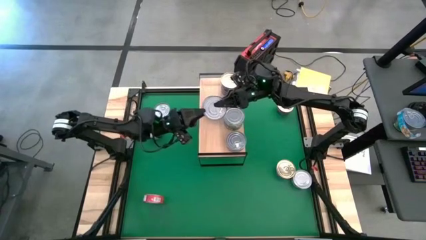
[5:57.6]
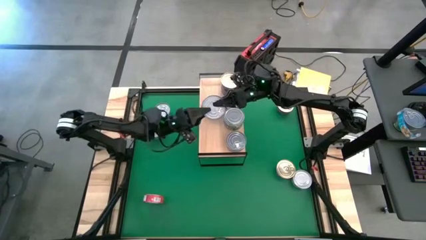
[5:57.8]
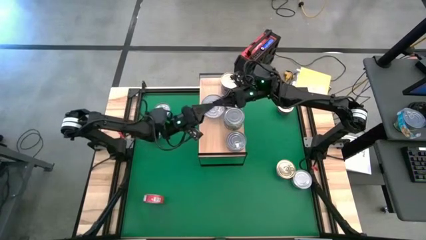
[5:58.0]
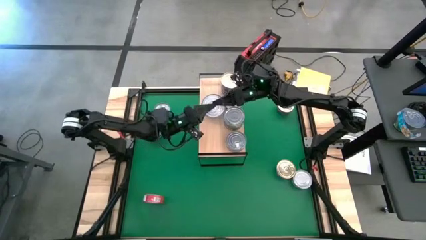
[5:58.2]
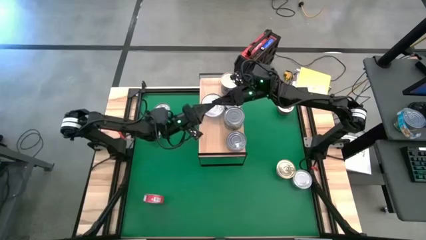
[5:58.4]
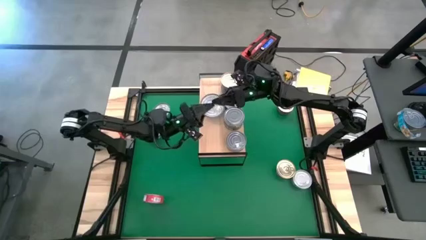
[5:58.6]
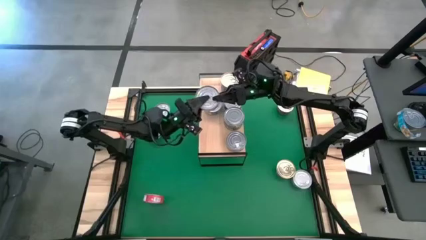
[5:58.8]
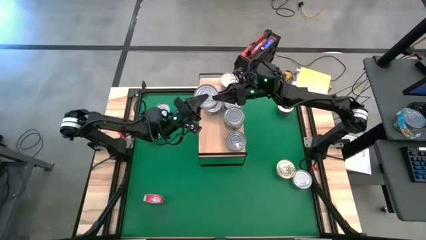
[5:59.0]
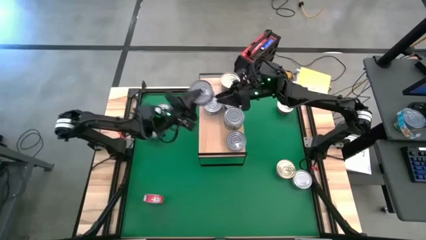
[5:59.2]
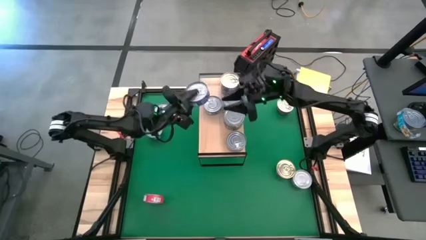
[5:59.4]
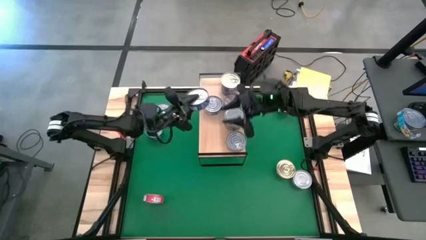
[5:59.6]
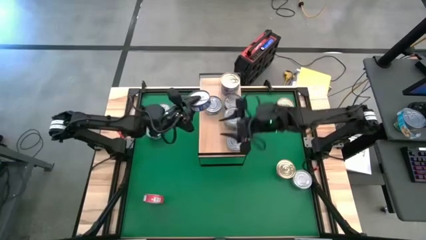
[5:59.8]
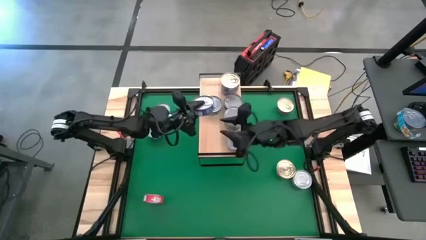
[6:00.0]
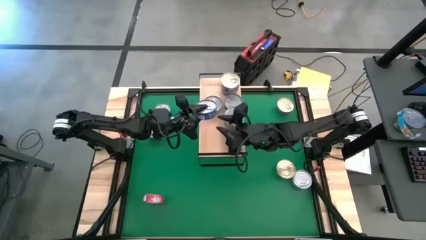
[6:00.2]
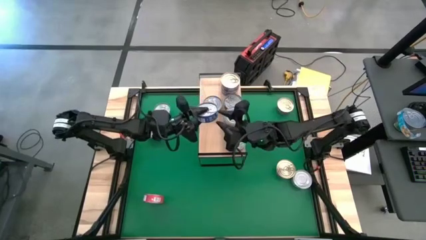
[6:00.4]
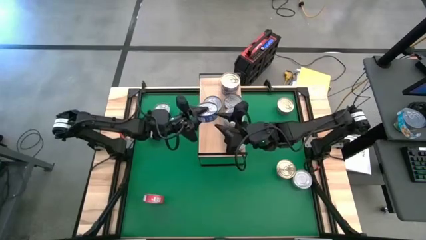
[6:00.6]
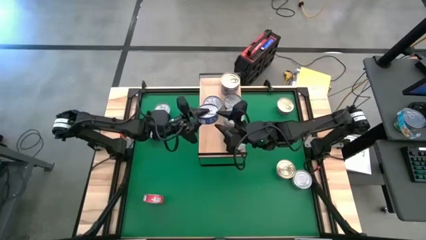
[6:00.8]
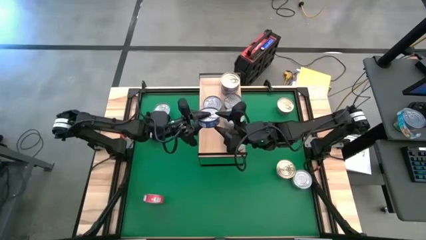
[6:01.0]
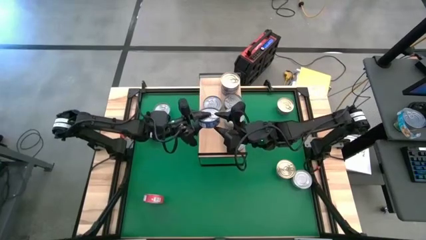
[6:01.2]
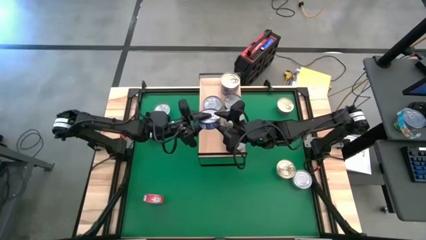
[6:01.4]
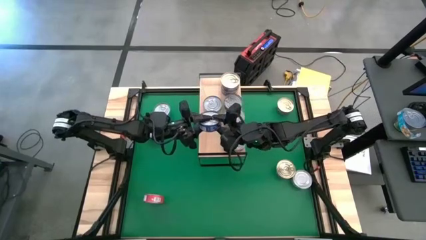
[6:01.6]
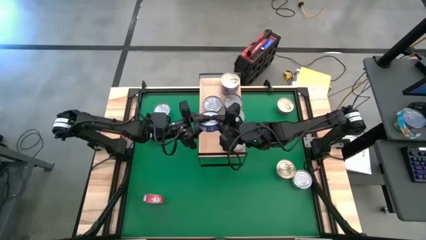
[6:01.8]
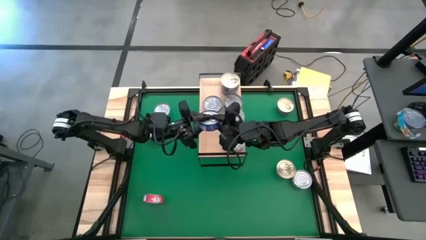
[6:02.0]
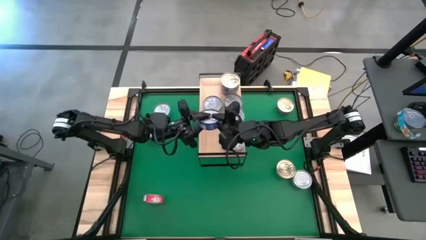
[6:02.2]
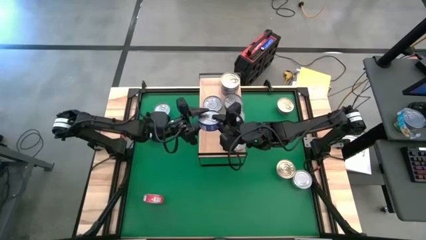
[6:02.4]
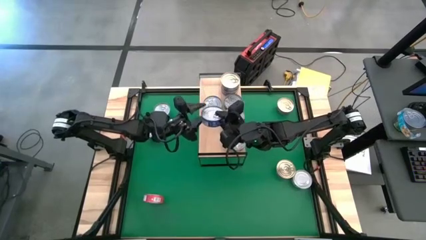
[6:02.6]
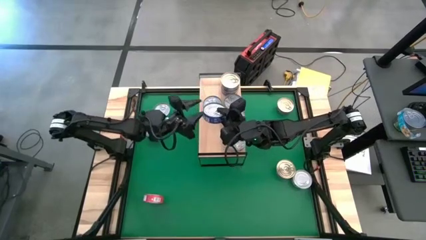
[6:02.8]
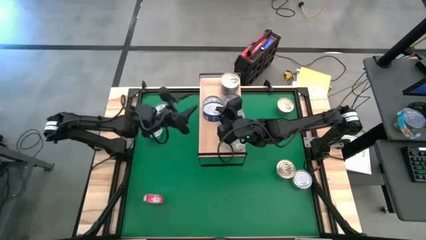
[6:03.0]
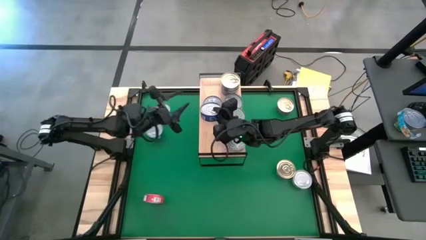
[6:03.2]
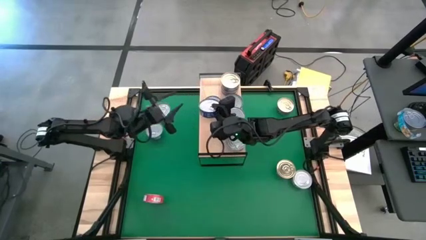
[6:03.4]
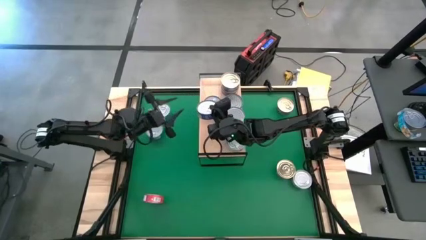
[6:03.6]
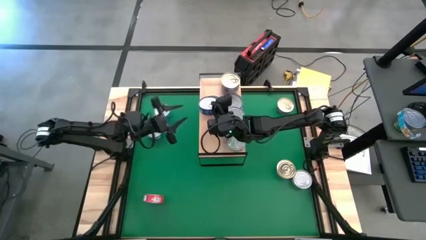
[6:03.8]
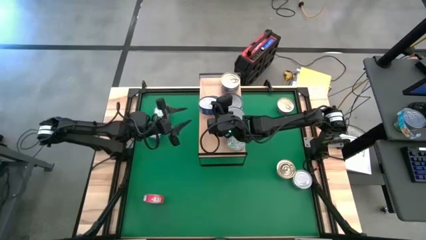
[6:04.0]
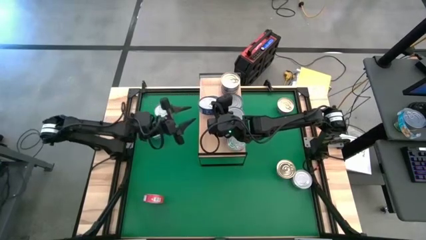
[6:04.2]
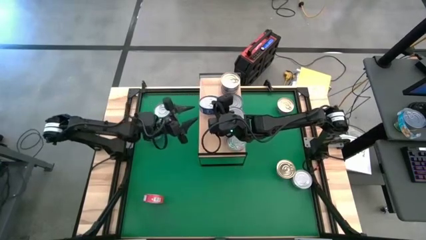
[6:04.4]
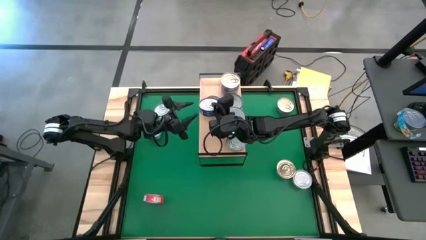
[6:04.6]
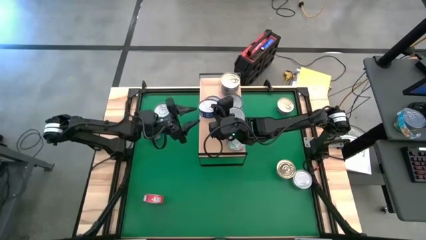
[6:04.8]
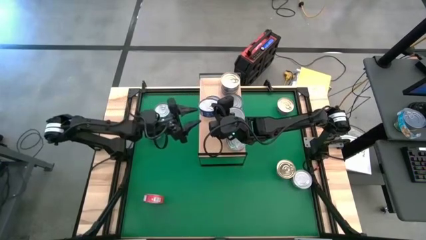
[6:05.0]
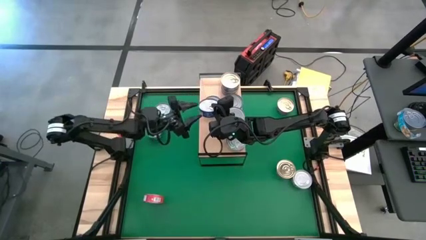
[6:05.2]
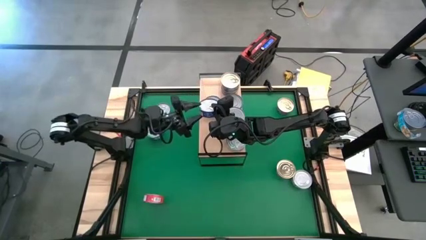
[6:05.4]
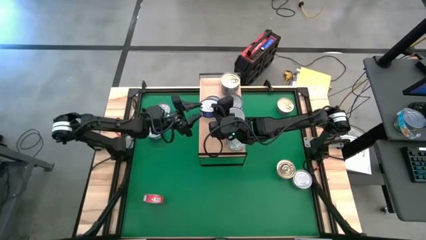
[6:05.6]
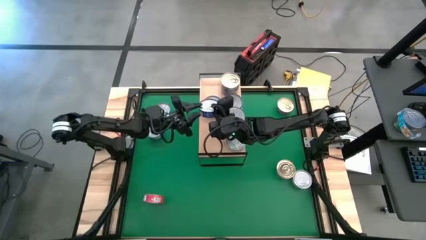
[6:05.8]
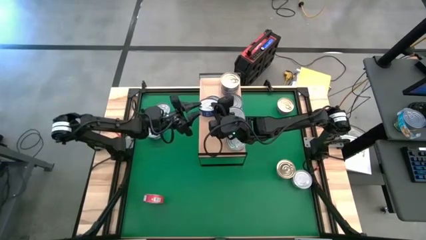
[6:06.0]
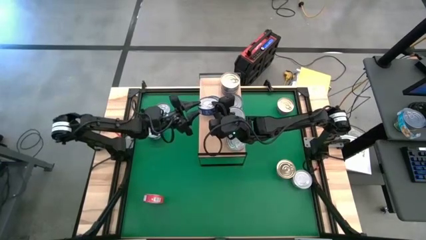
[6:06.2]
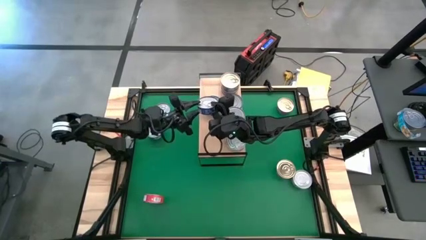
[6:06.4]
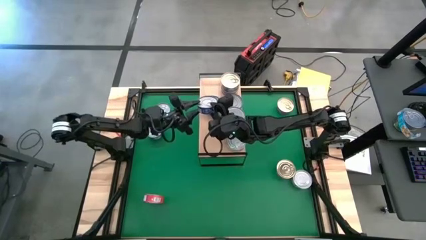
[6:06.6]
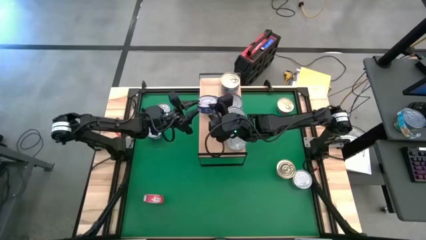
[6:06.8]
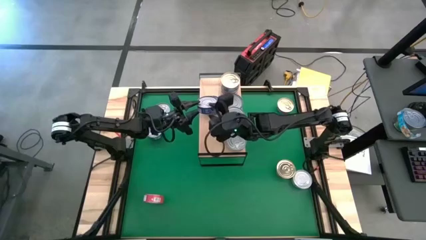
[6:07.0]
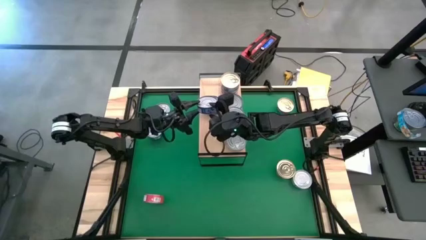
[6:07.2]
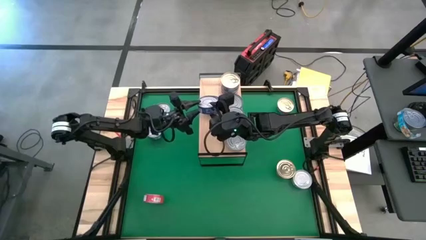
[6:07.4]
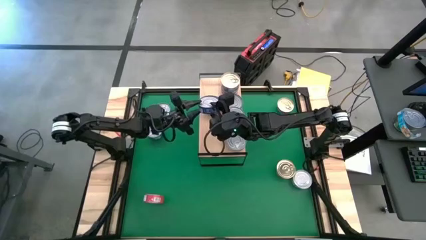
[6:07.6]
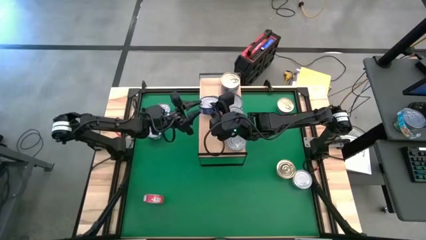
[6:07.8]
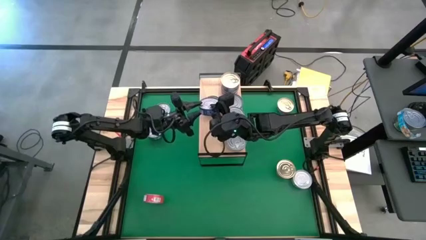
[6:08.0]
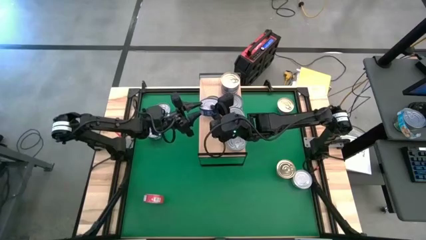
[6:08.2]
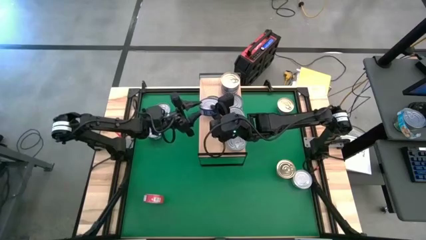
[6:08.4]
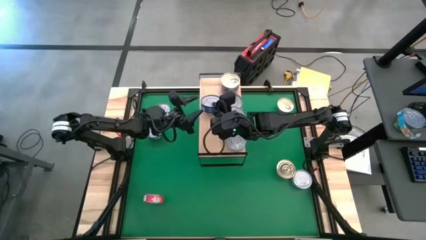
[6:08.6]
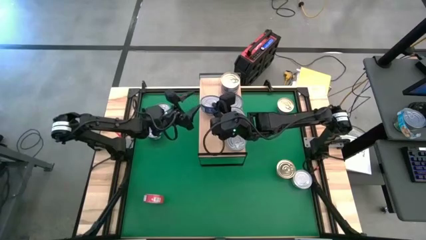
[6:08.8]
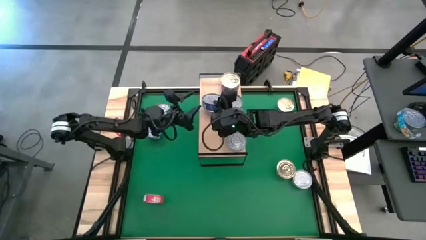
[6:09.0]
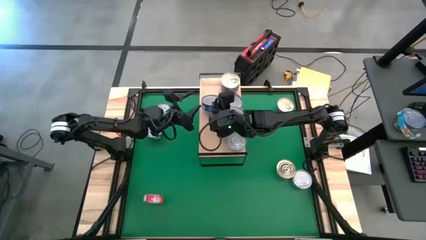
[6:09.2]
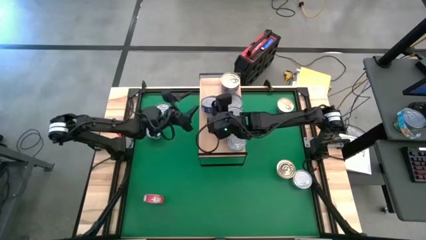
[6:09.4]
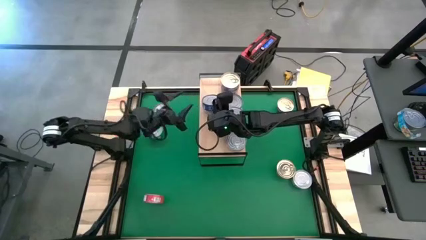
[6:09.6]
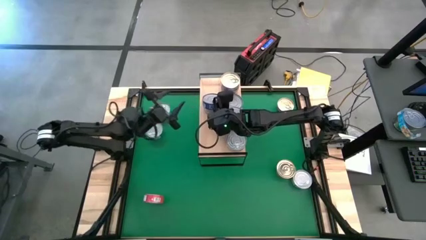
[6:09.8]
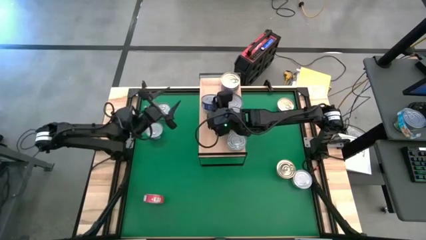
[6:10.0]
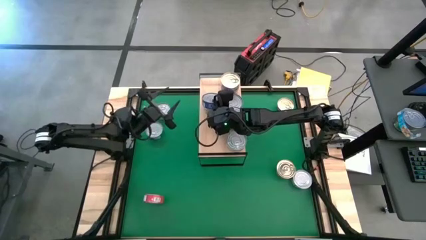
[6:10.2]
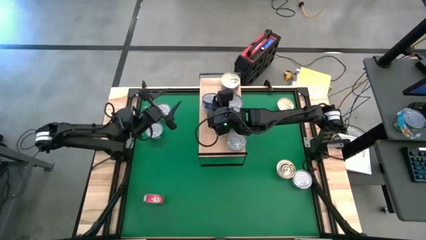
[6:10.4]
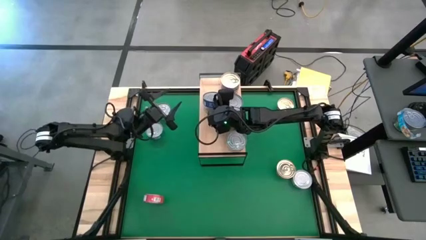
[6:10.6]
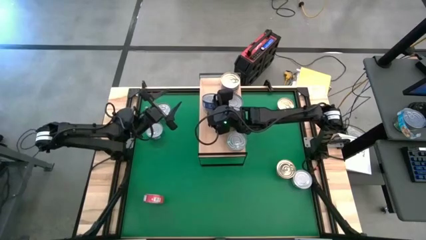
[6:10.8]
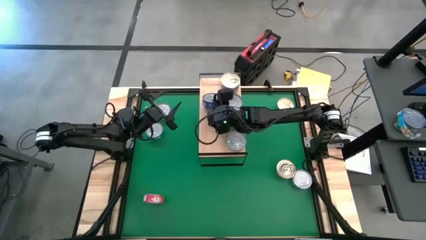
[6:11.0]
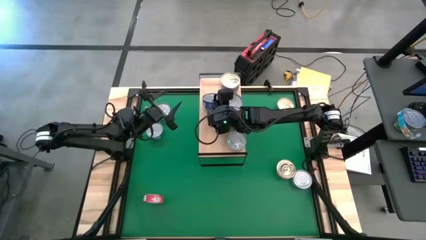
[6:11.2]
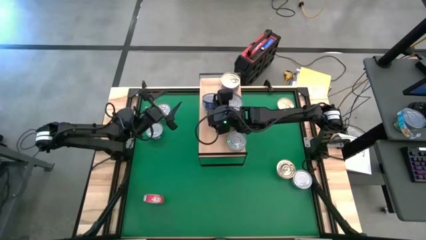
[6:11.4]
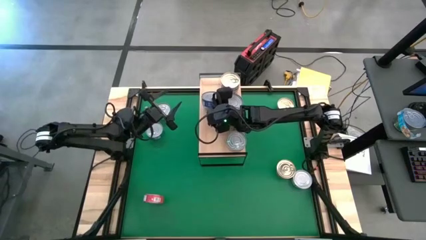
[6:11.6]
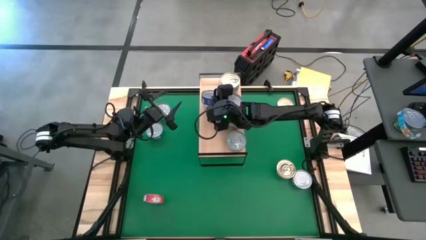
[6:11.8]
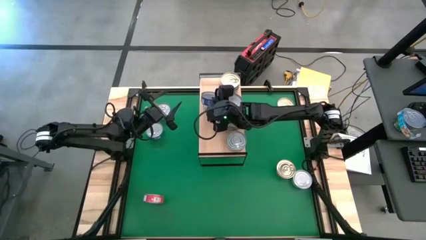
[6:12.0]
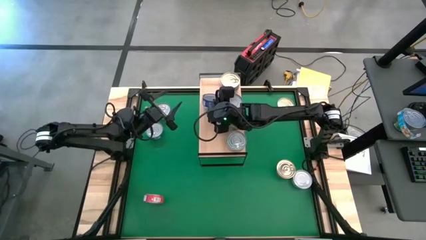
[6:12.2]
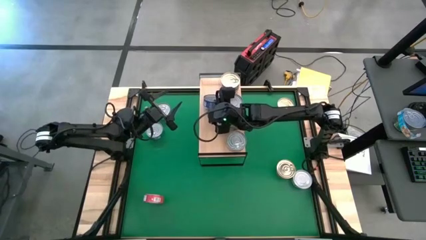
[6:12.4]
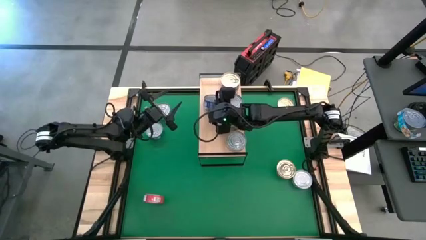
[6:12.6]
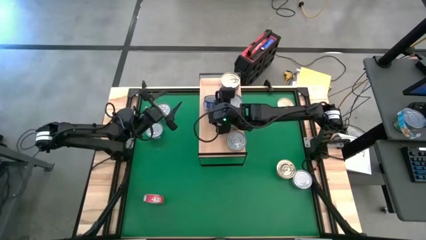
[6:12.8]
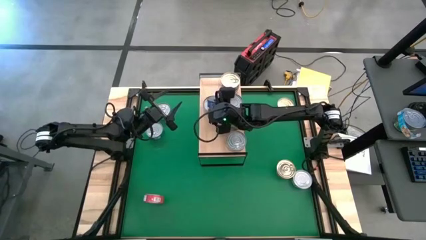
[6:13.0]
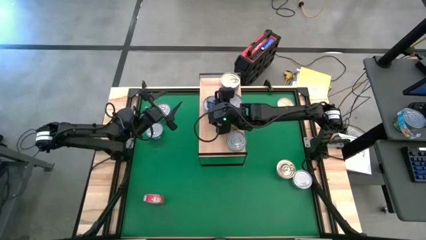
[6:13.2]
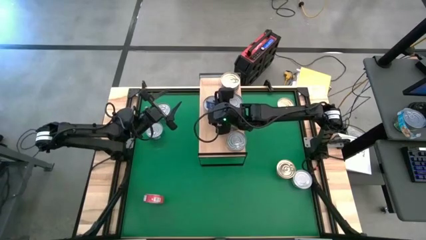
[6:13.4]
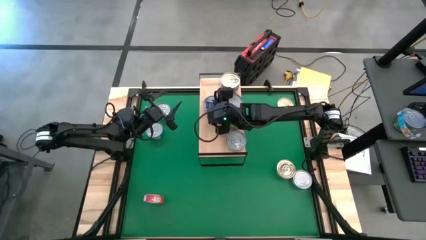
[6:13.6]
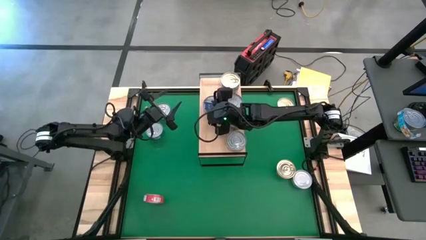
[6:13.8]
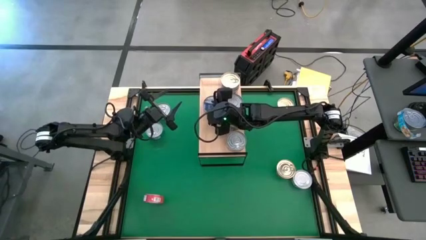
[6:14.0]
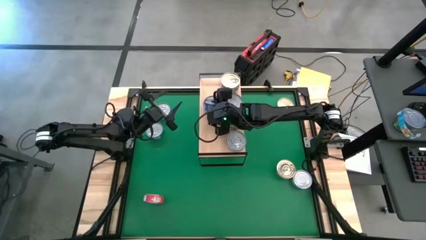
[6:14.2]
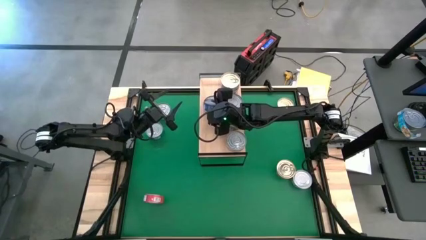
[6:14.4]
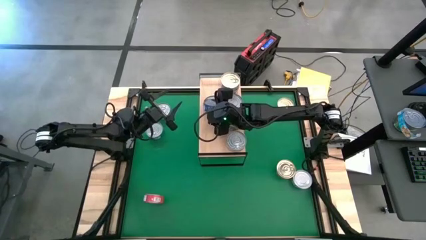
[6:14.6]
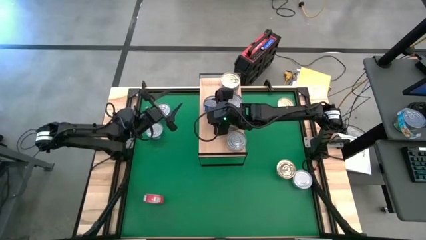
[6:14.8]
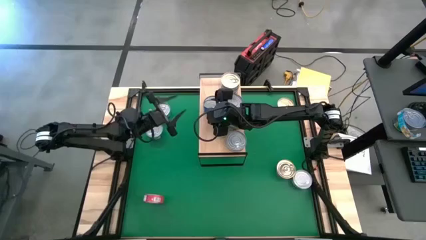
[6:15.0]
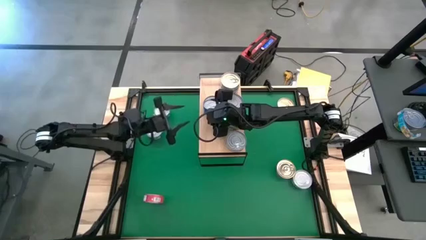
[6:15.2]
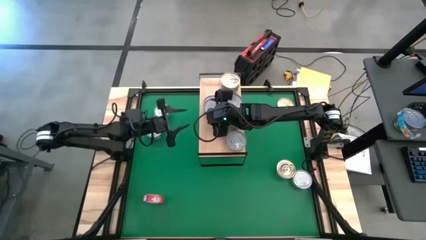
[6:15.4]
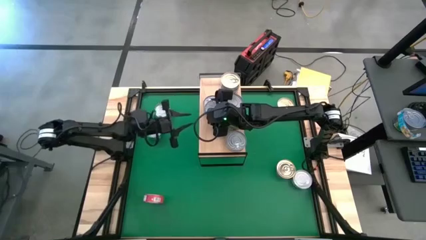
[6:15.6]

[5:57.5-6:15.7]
Task: Stack canned seafood by type on shelf
Stack the blue tuna can on top of the blue tuna can on the shelf
